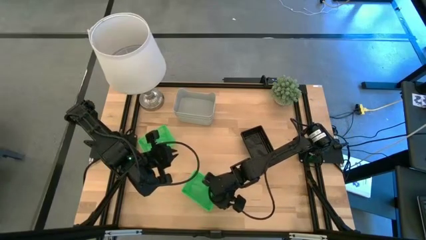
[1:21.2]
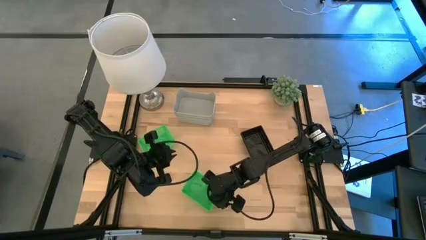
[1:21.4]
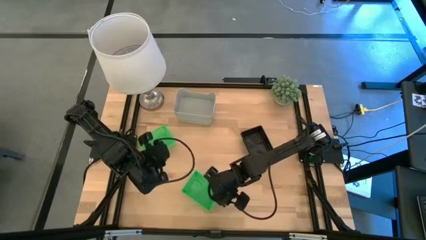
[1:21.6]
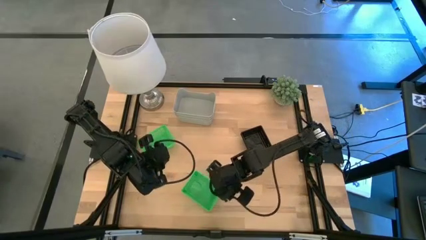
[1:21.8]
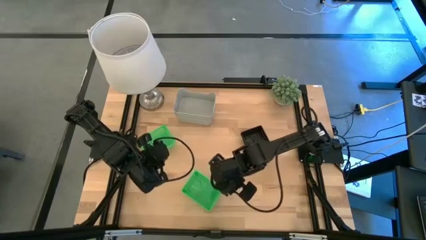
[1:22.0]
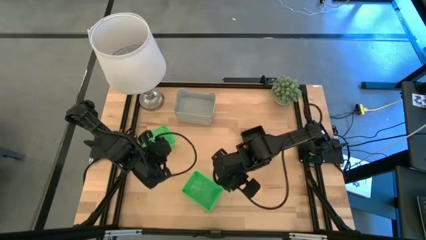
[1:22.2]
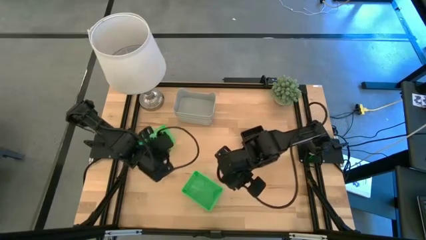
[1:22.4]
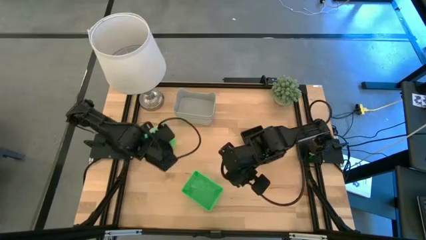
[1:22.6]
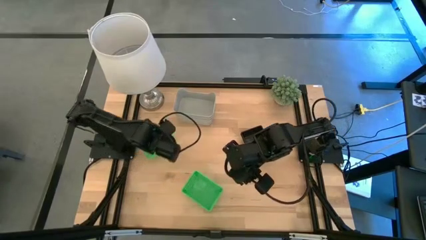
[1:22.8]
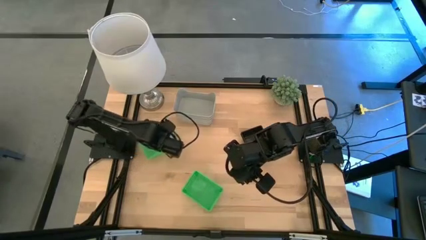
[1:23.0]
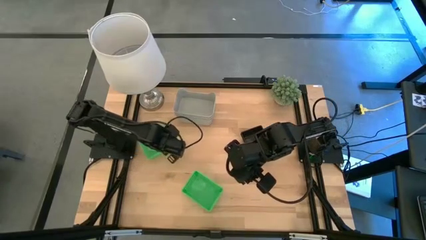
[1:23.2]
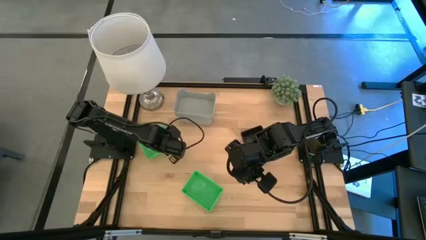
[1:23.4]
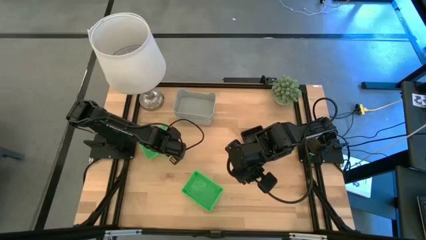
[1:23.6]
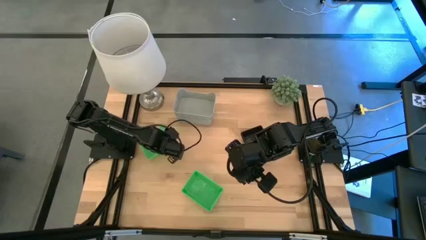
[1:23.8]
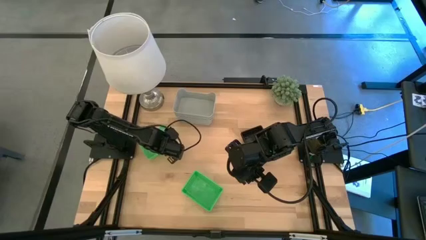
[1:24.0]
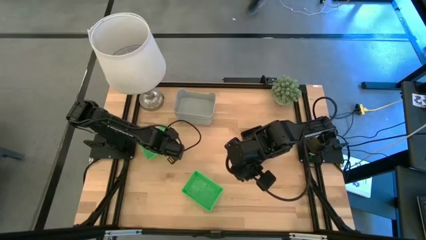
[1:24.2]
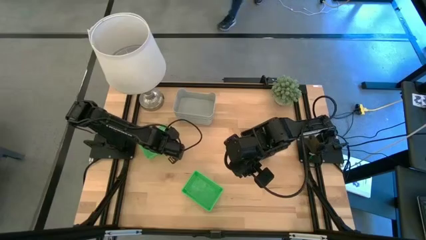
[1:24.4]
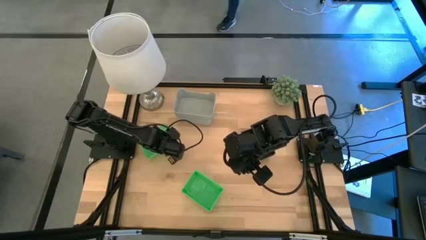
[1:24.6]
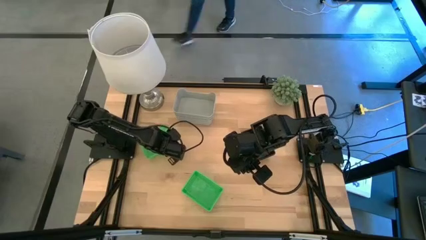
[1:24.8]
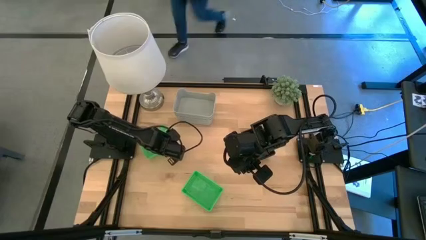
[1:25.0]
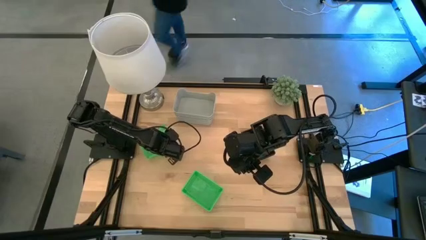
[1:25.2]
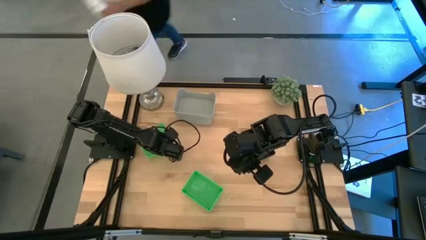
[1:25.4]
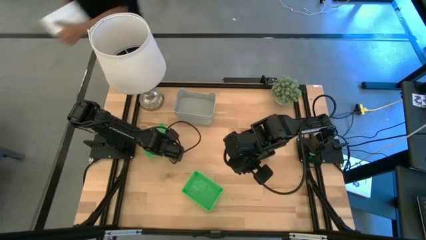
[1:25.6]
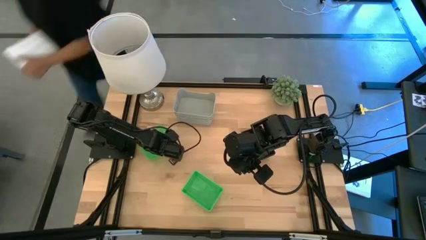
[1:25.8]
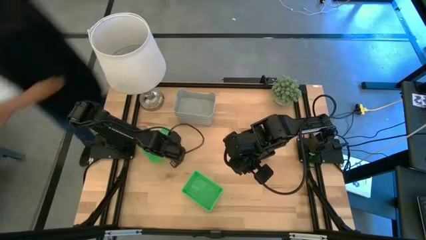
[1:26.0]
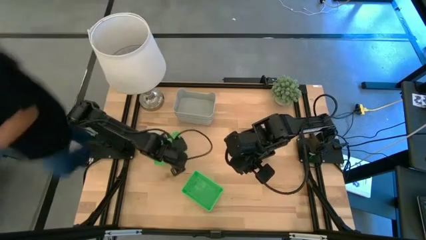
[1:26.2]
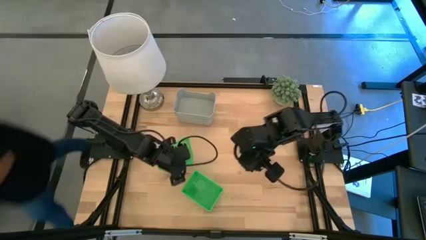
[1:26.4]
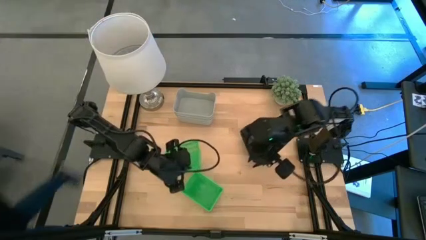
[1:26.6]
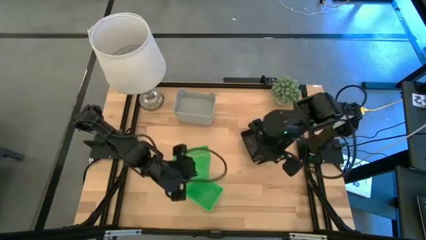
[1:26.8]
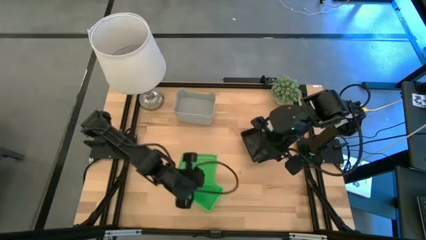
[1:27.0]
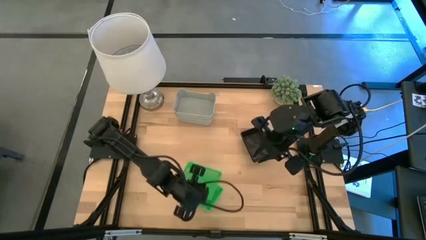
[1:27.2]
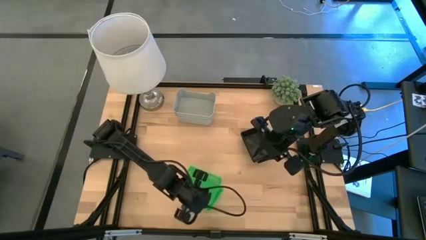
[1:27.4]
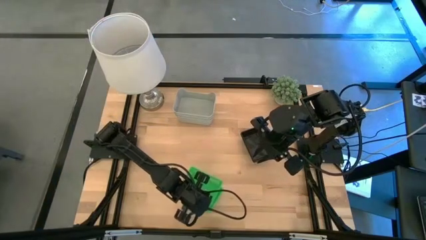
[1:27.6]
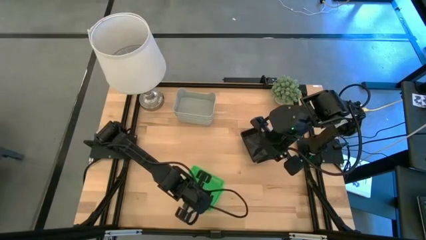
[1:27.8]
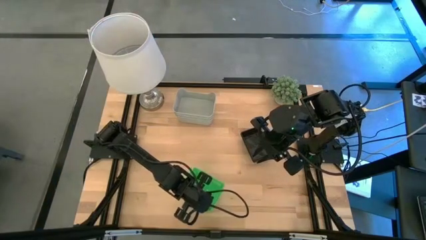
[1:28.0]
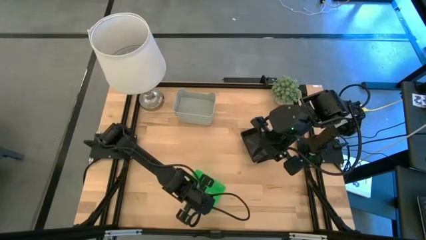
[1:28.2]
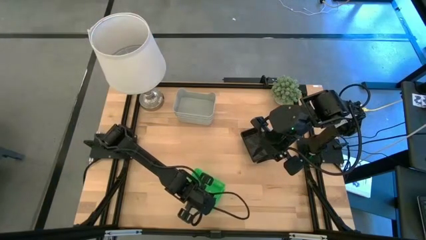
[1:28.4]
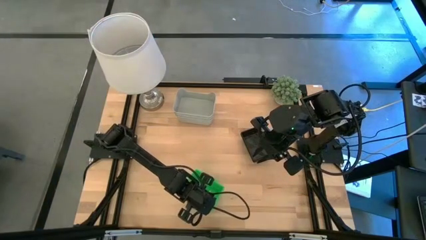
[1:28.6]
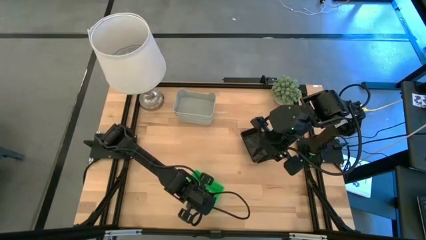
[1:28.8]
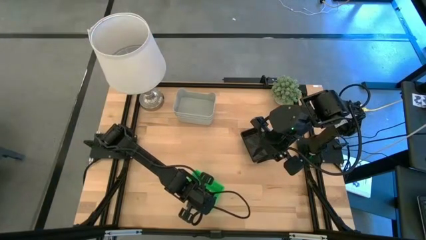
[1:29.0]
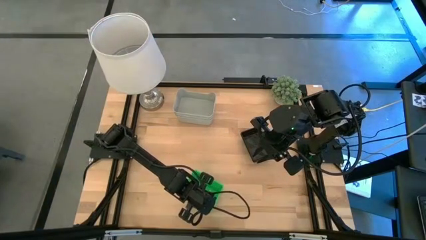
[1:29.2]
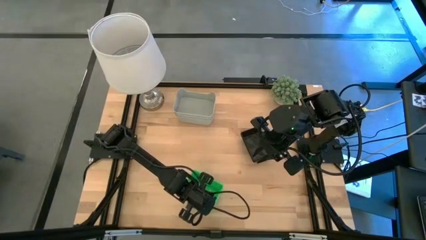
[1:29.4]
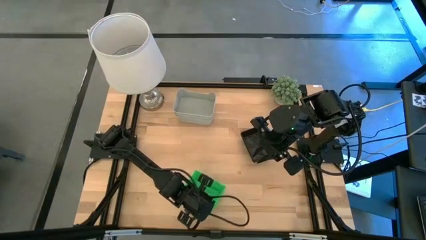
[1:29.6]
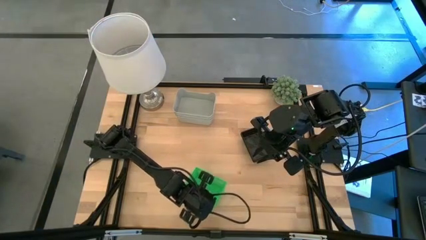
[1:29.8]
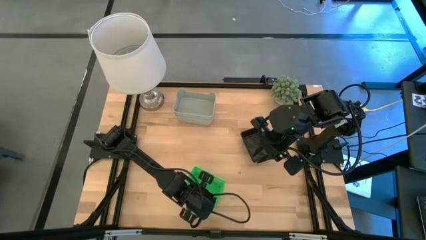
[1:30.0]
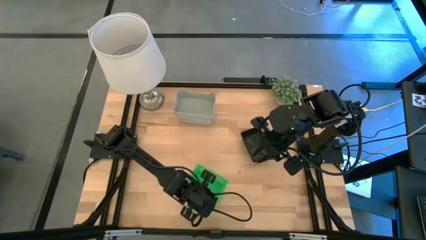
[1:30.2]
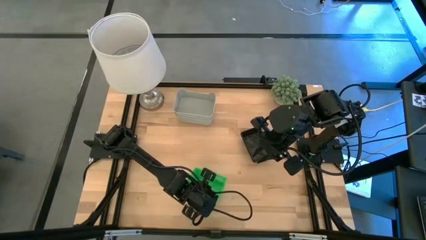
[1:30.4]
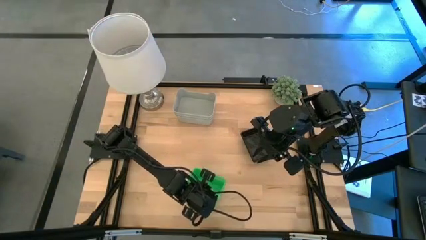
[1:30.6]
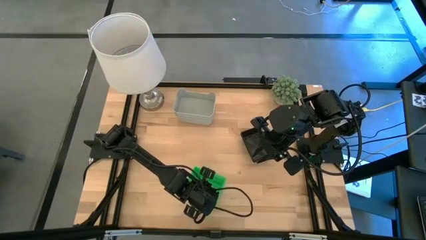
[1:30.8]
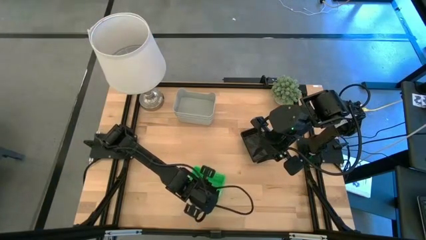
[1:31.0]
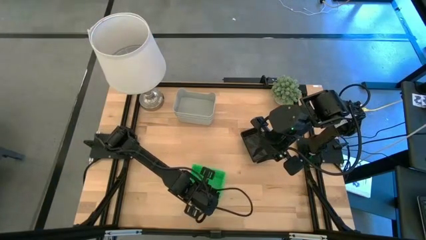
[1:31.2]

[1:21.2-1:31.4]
Stack the top green bin on top of the bottom green bin

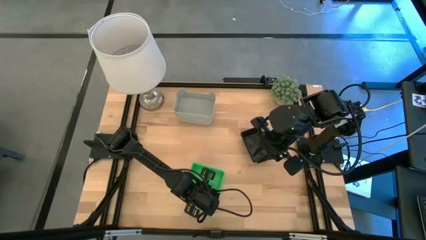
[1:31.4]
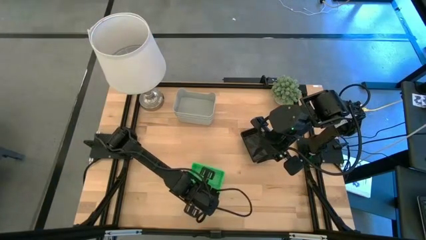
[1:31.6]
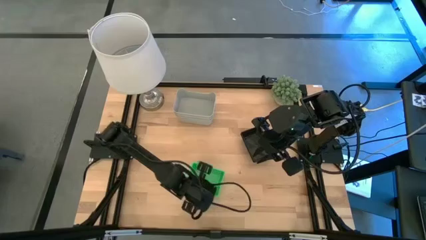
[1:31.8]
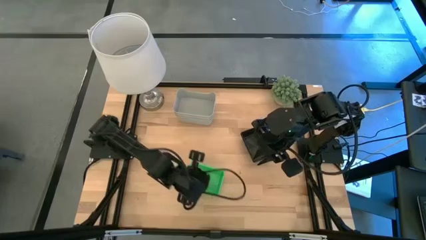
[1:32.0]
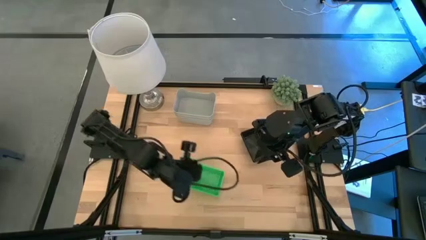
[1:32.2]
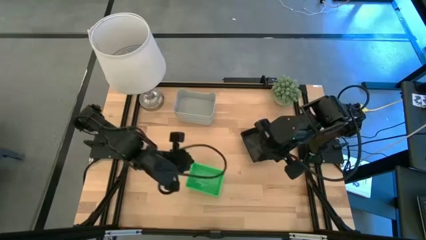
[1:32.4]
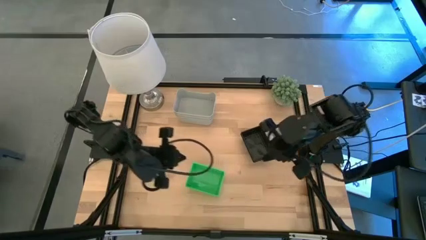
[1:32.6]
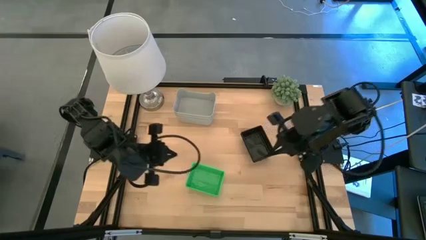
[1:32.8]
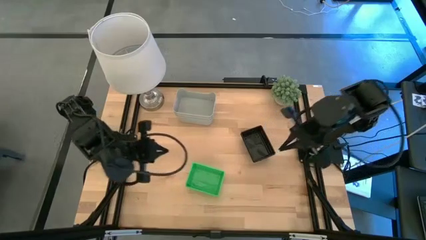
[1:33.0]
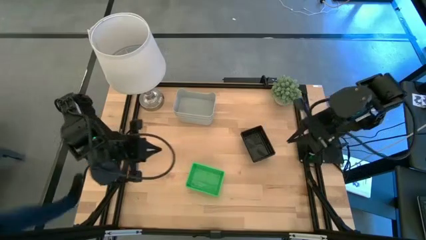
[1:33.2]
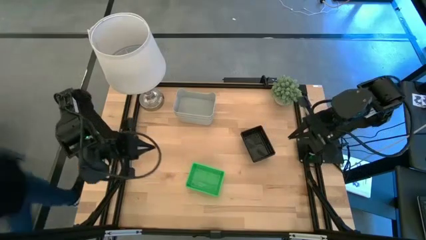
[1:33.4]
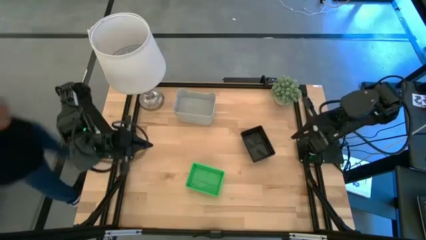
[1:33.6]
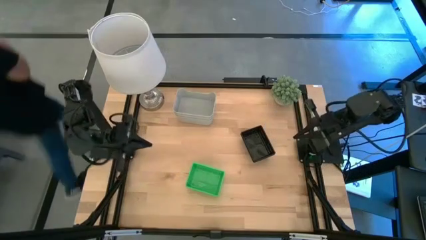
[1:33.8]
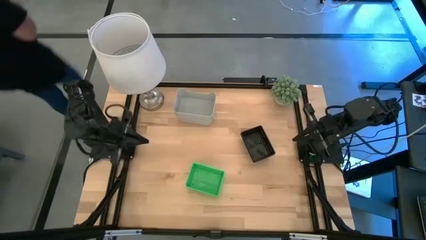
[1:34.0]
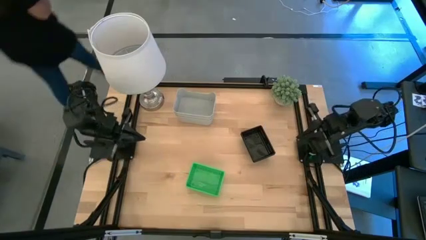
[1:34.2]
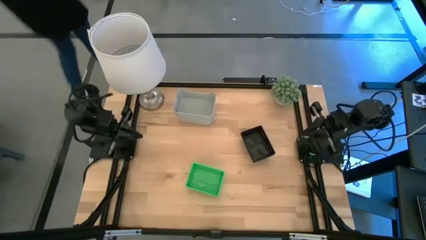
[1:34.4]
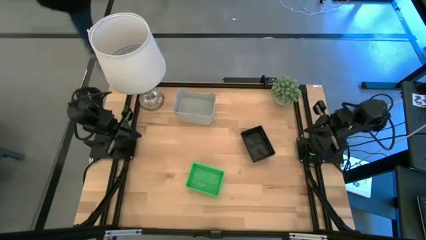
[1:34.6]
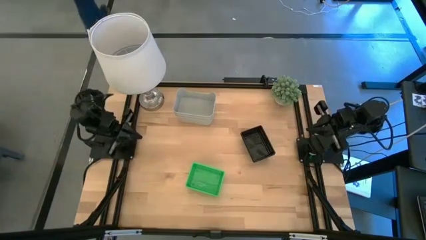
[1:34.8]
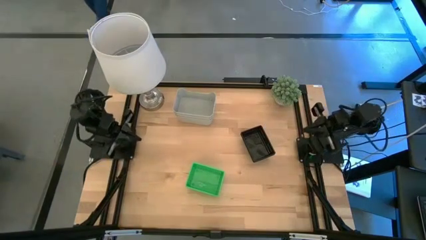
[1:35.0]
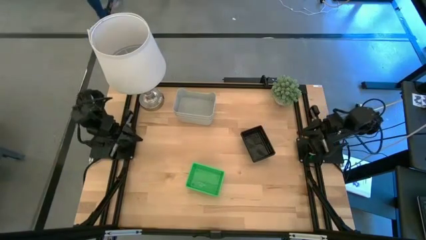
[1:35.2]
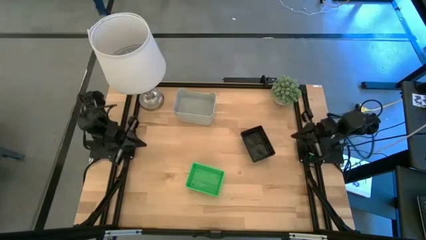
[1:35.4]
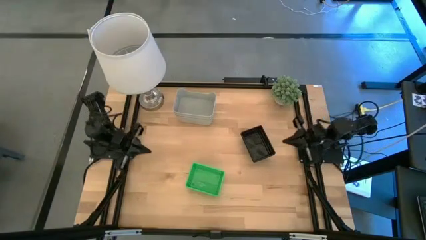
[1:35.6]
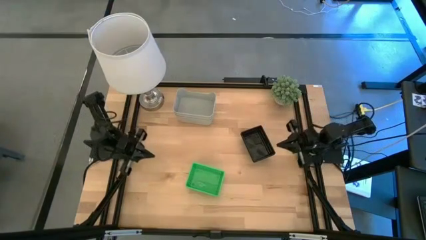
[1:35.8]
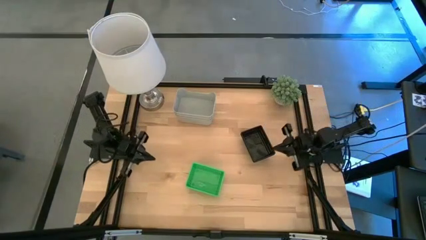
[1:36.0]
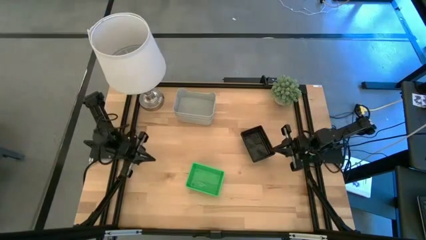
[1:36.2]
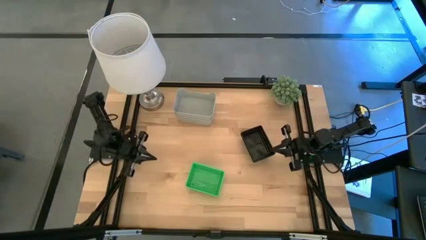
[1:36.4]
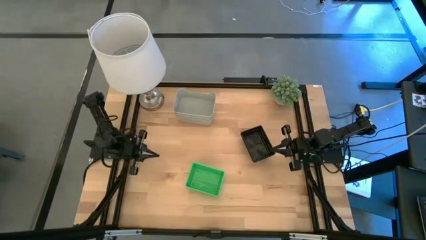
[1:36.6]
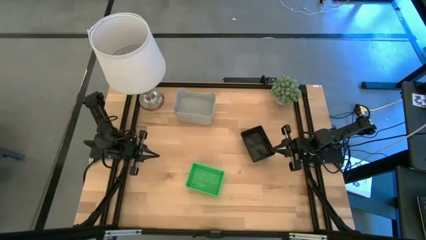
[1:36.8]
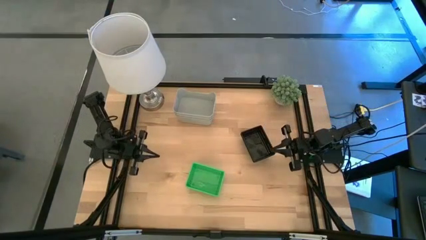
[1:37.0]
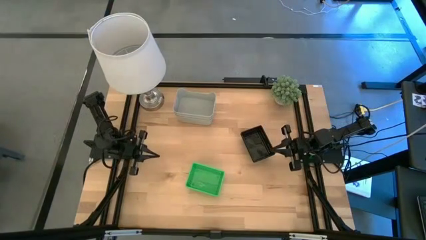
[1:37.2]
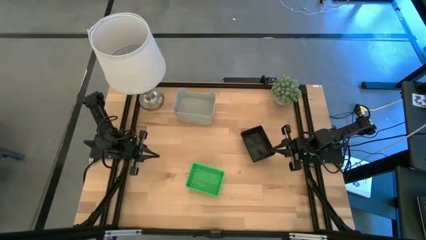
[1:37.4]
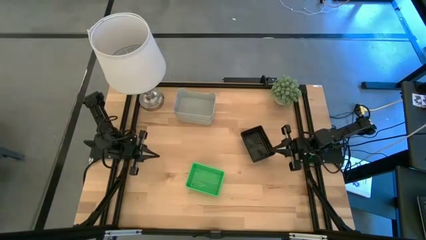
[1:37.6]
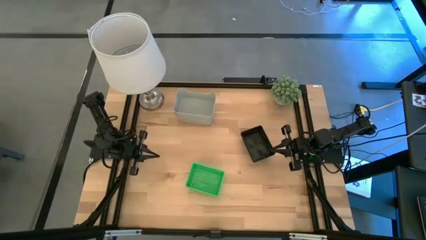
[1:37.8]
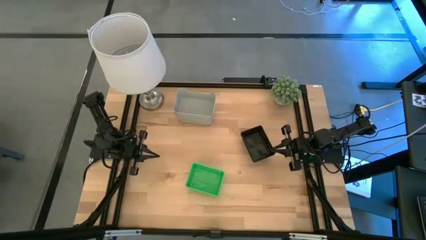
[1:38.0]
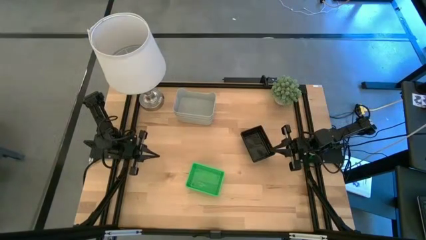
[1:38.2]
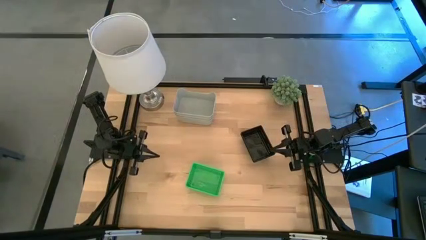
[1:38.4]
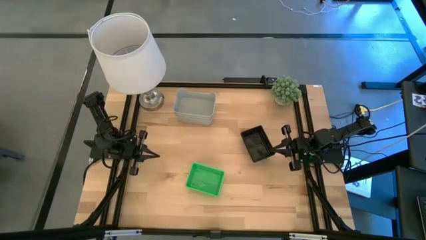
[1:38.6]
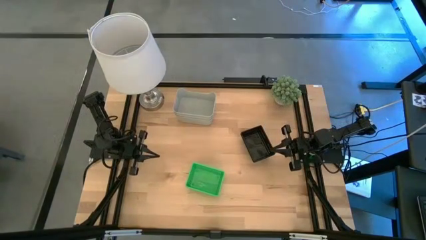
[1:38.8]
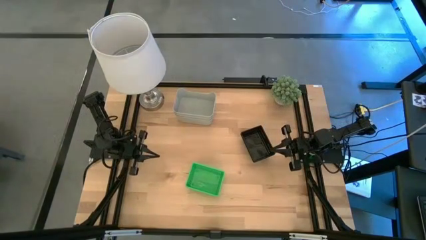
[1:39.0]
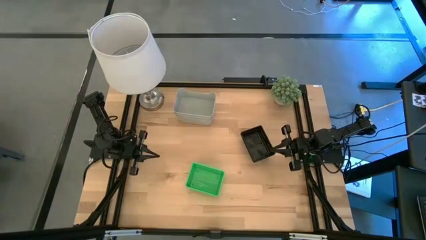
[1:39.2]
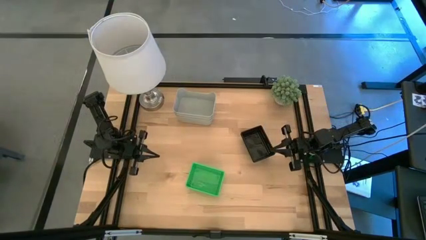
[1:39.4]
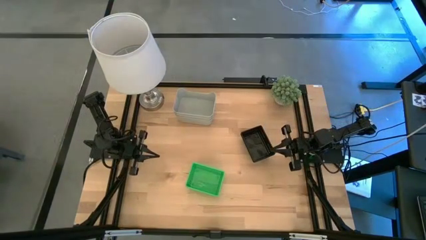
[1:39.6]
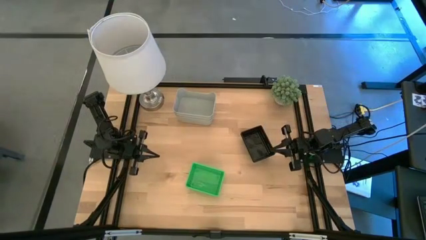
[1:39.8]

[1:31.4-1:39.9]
Return to Home Position
